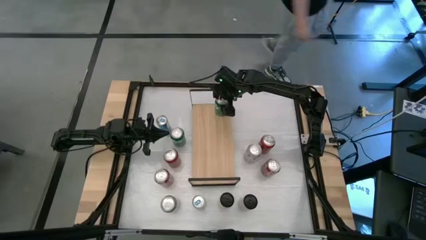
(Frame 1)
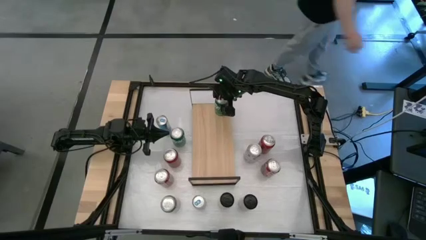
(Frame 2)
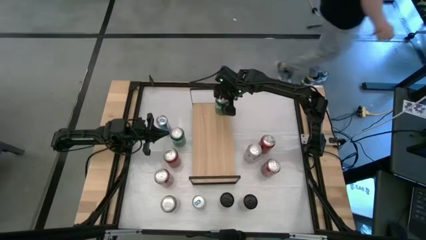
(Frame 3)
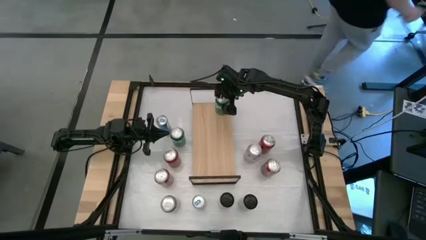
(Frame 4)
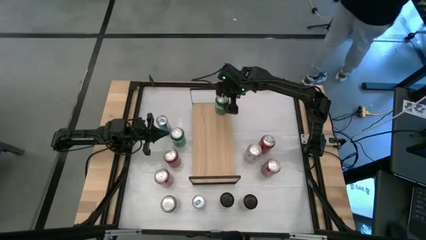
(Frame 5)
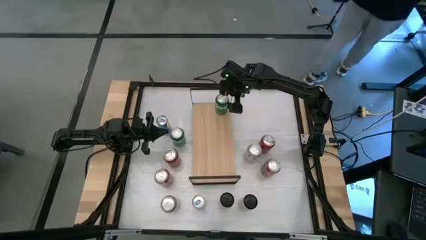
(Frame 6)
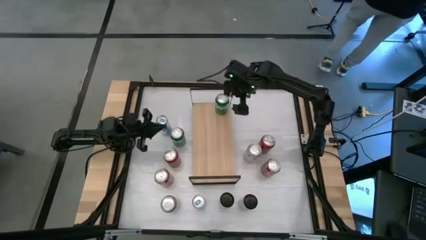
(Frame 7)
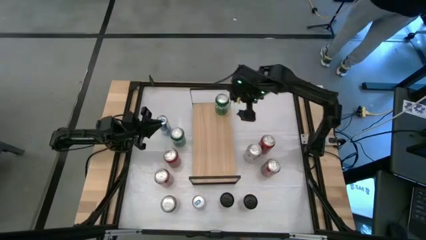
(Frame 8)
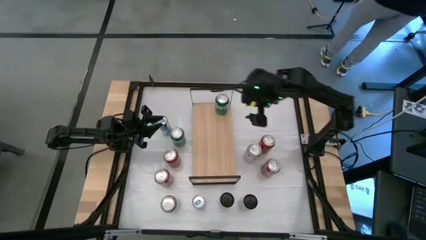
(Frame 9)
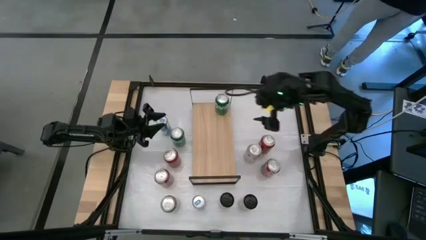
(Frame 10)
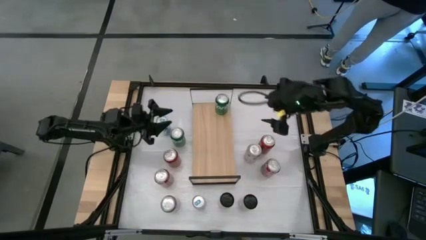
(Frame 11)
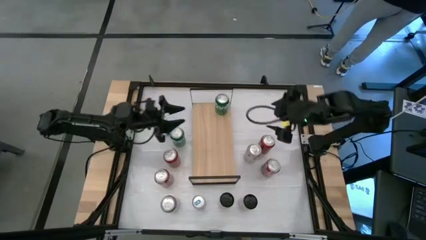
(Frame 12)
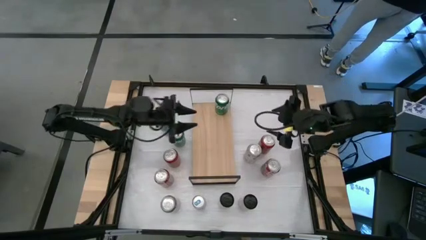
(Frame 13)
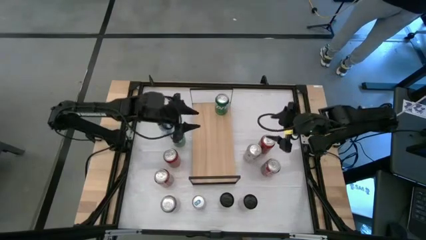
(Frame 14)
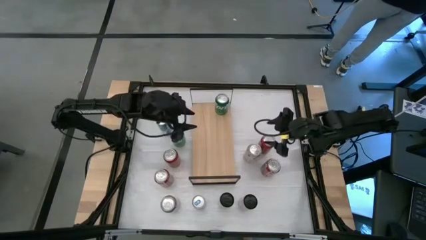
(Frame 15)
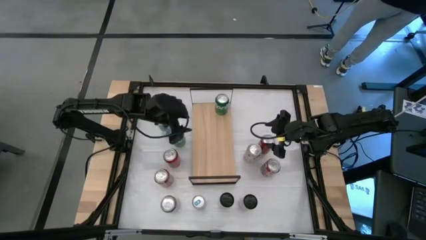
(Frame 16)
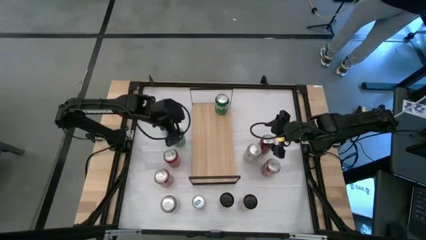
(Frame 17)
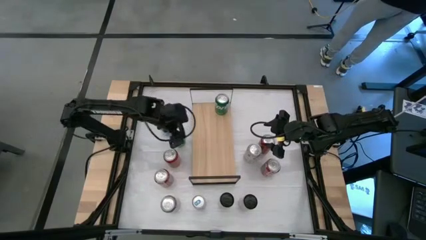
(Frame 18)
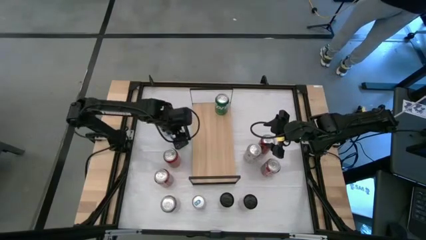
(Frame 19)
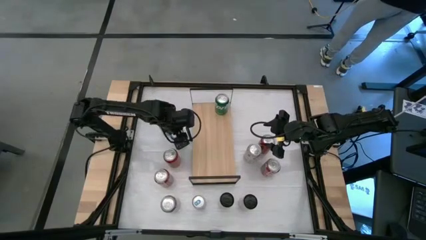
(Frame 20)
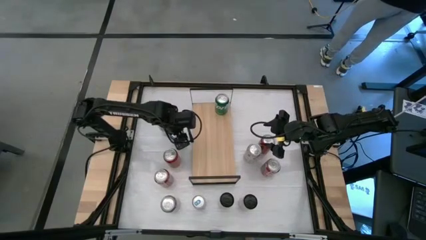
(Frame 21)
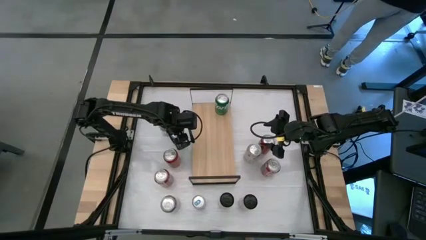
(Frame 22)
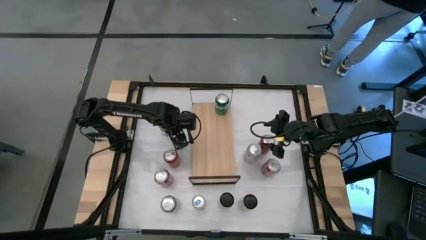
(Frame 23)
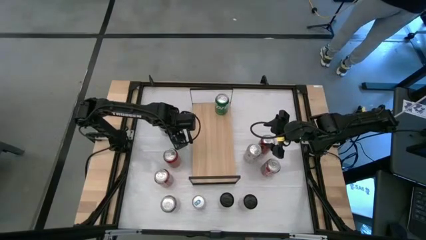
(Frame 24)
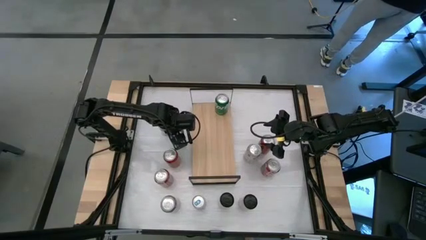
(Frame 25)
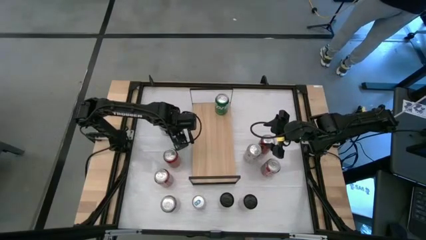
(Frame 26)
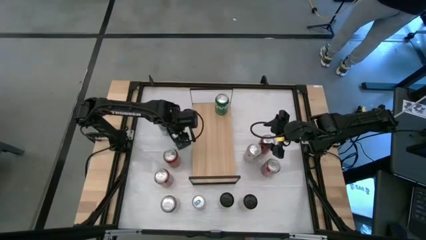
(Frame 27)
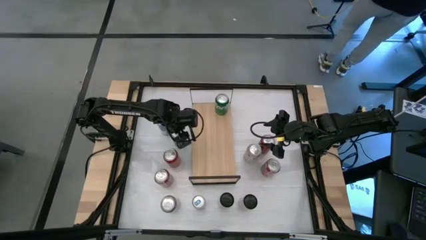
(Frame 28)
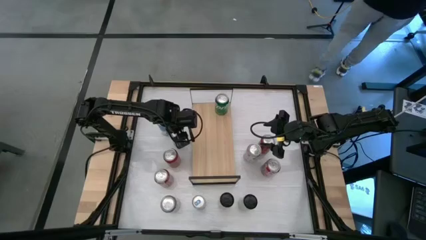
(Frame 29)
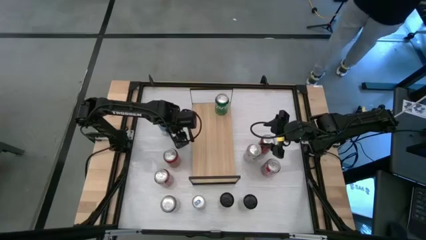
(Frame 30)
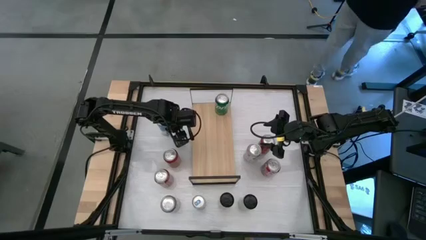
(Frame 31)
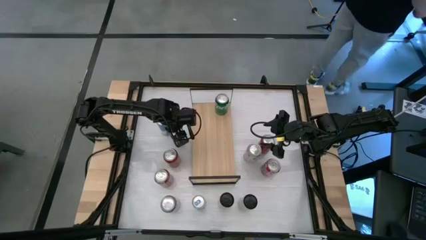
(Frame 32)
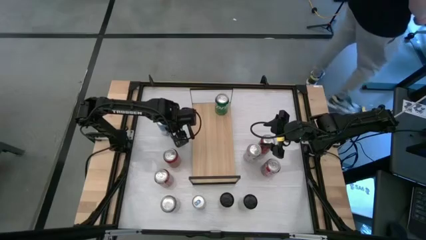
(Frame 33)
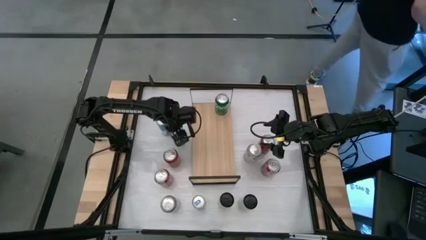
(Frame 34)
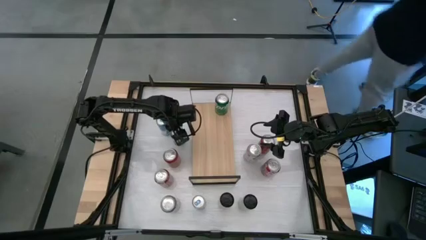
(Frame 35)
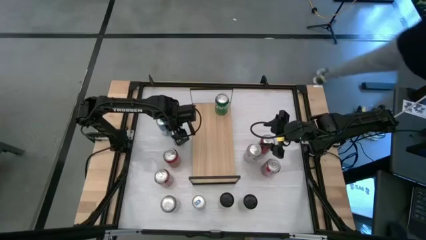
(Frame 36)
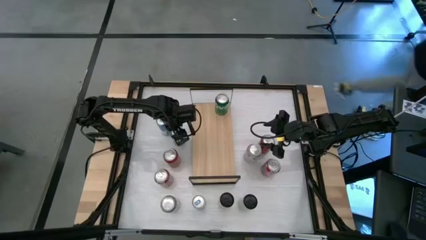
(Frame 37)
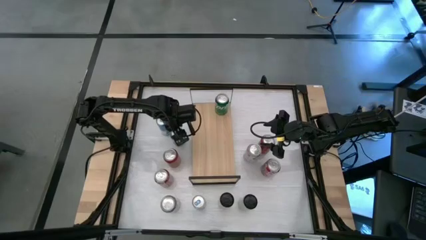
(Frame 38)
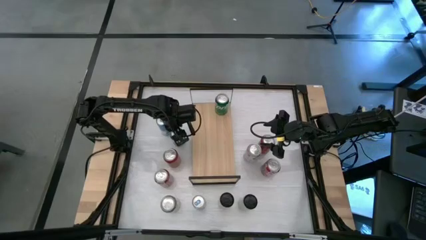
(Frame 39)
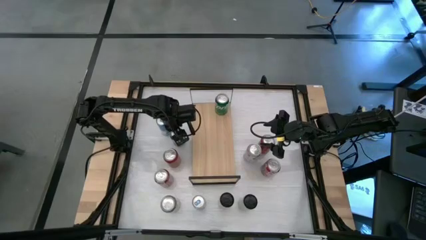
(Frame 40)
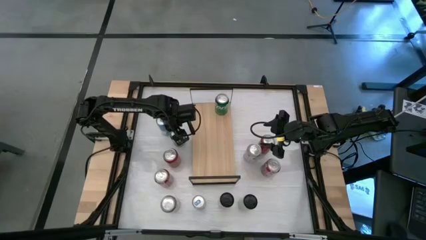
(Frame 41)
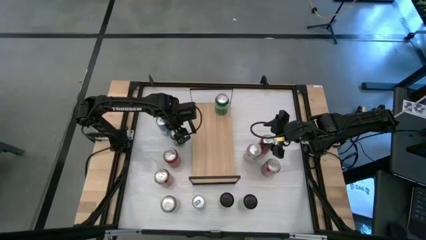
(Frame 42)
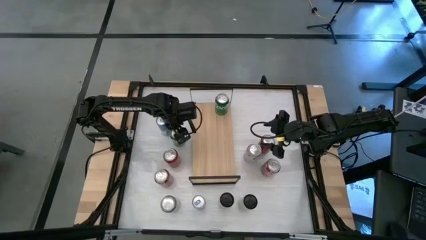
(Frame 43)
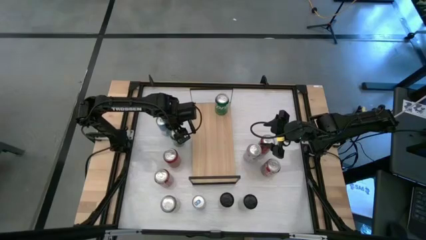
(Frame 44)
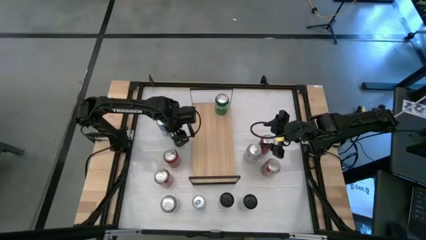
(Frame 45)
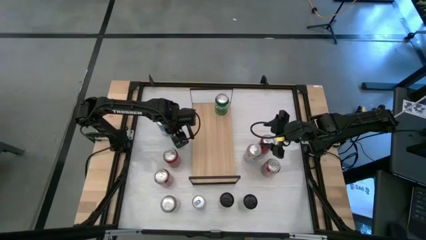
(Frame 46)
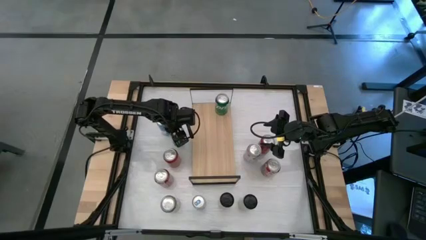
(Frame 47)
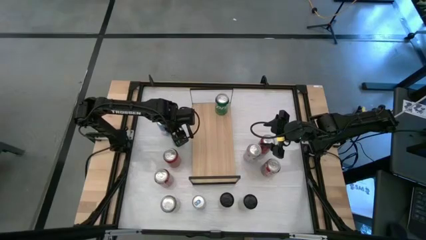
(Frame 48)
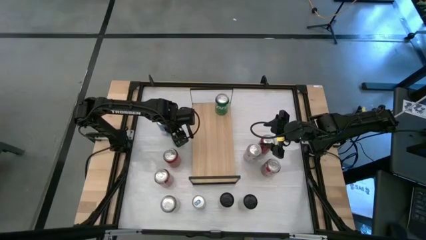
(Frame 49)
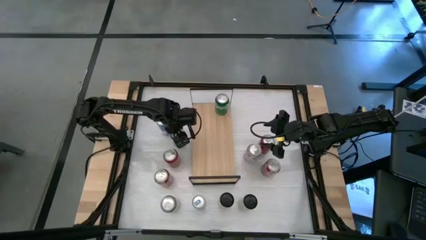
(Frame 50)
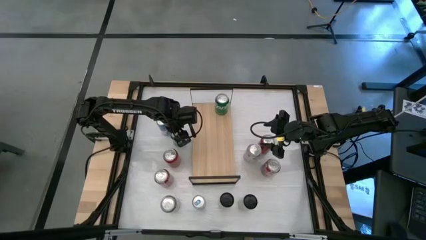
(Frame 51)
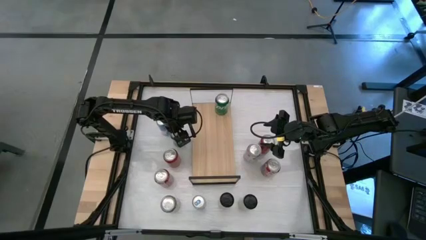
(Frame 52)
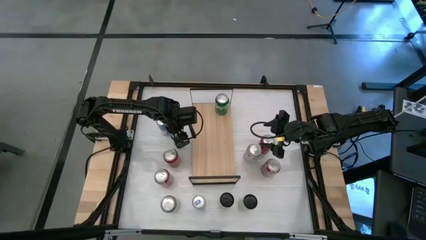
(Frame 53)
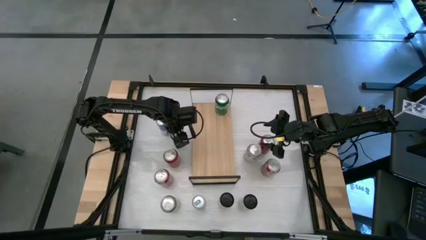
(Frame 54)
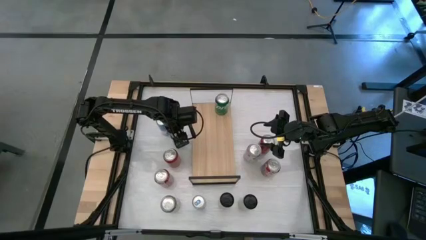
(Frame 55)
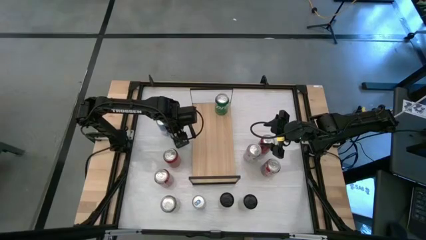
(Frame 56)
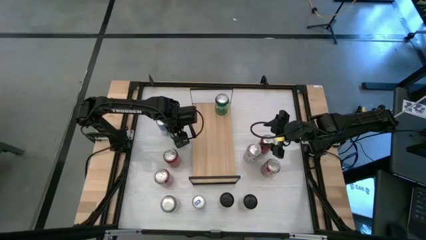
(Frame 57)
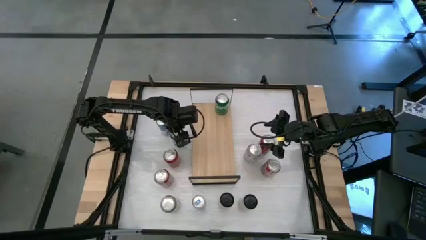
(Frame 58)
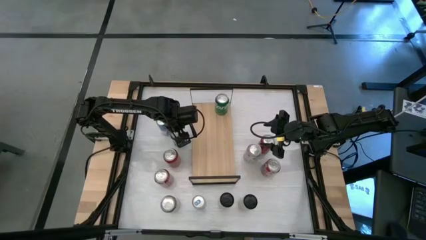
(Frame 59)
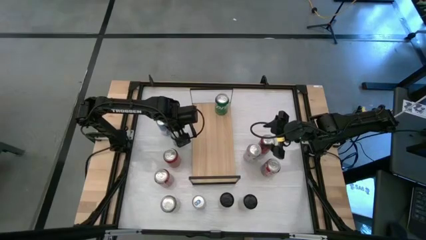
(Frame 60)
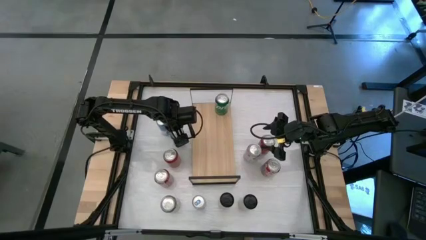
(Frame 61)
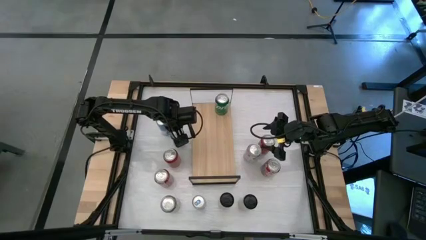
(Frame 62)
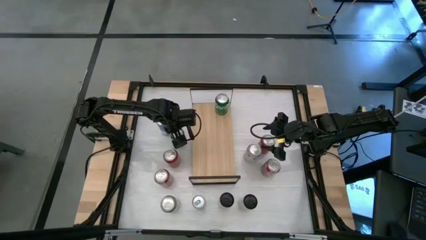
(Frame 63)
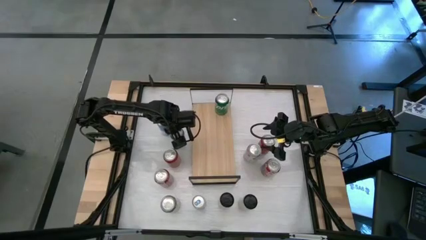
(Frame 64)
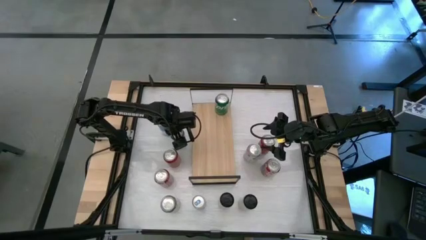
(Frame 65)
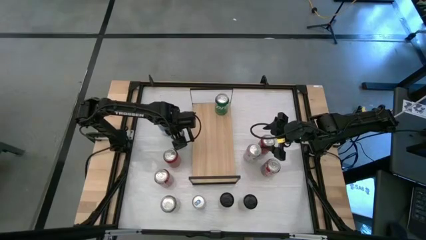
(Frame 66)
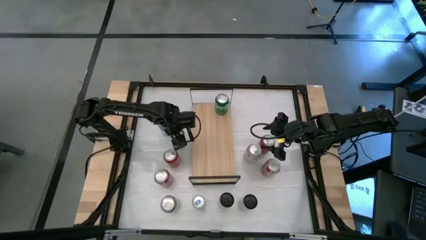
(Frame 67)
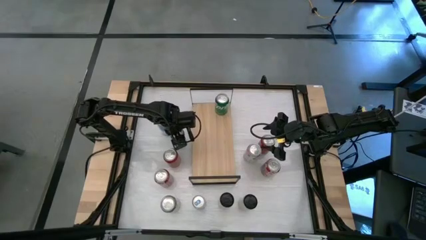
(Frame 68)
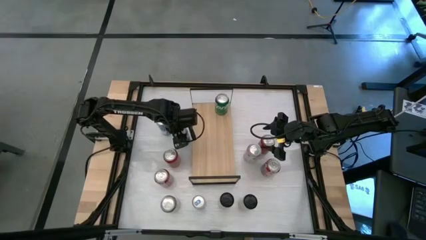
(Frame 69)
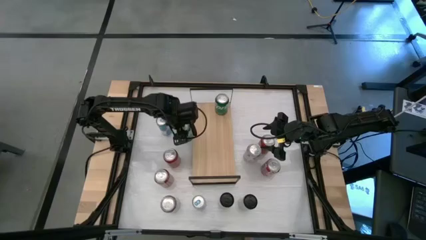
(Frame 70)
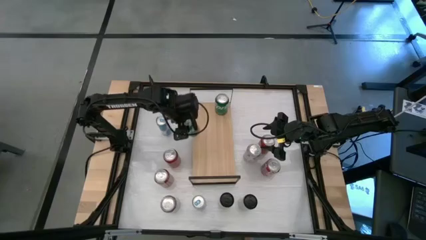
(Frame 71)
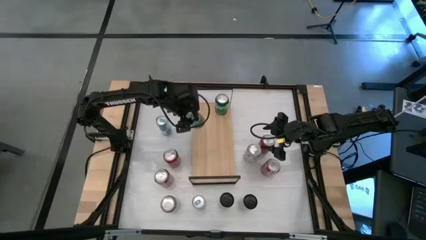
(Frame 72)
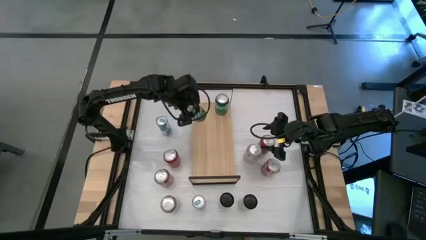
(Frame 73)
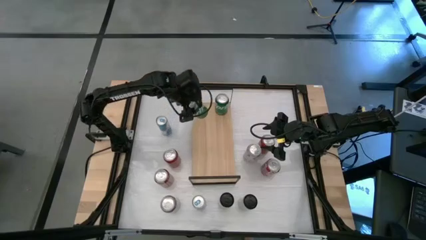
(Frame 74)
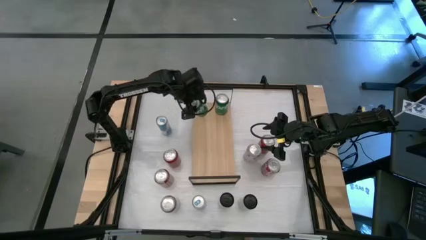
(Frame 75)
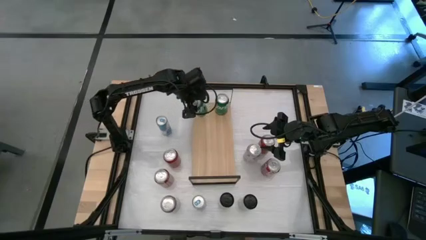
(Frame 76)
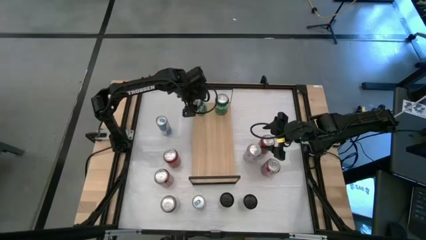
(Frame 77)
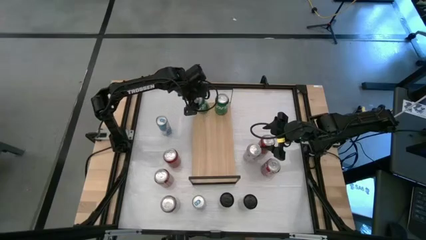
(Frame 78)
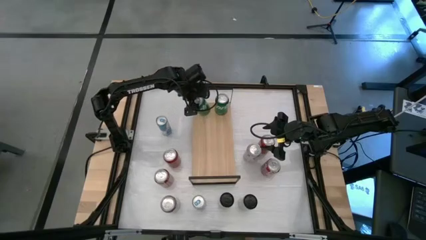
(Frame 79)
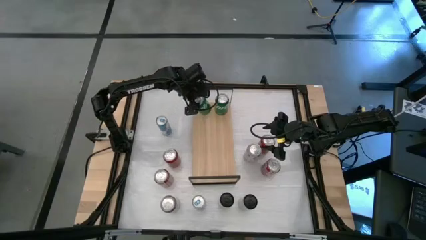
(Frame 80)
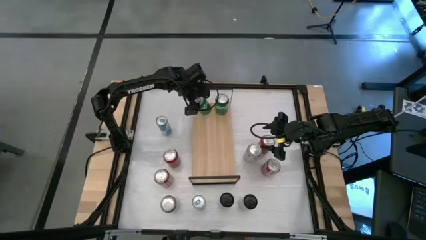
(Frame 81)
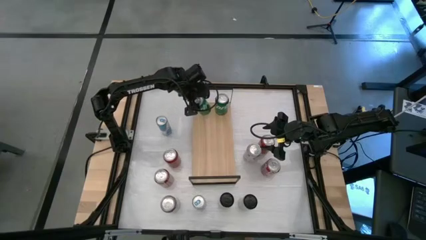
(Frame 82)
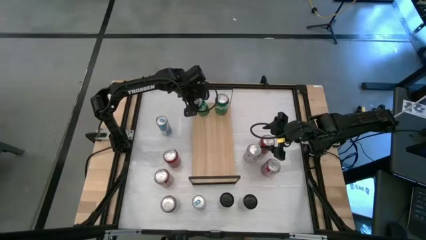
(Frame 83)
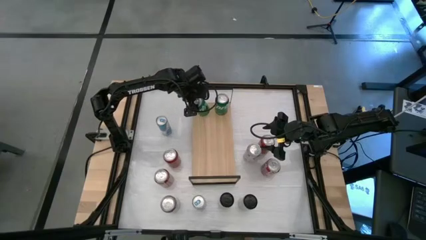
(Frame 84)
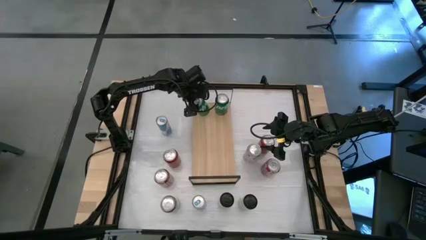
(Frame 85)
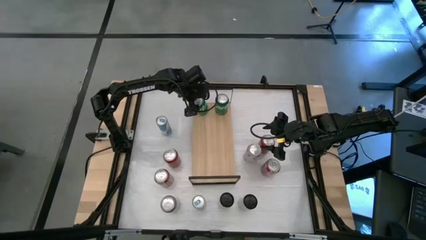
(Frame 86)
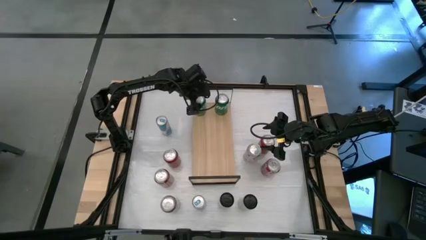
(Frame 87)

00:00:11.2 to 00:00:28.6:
Task: Place canned beverage on shelf
Put the green soda can on the shelf aligned with the other green soda can
